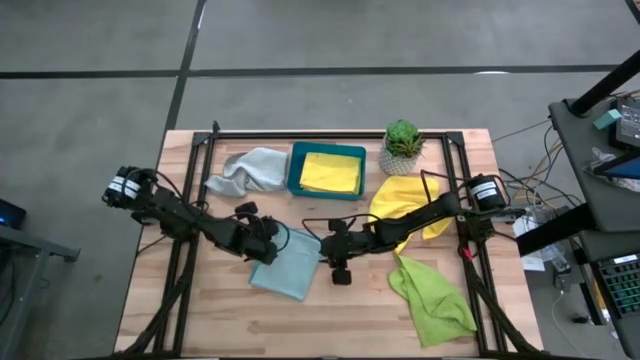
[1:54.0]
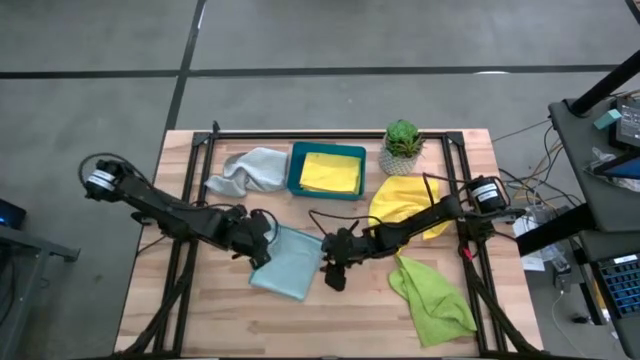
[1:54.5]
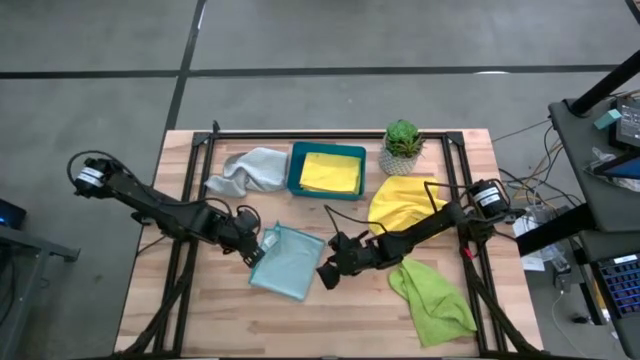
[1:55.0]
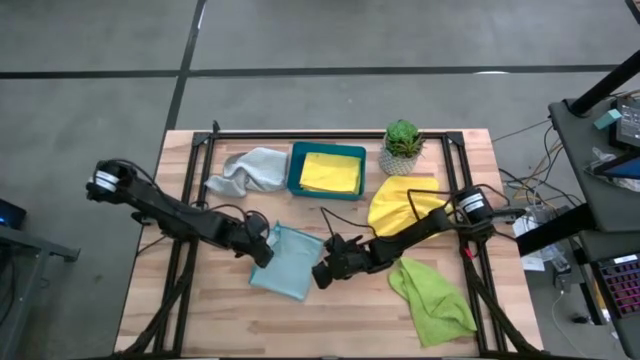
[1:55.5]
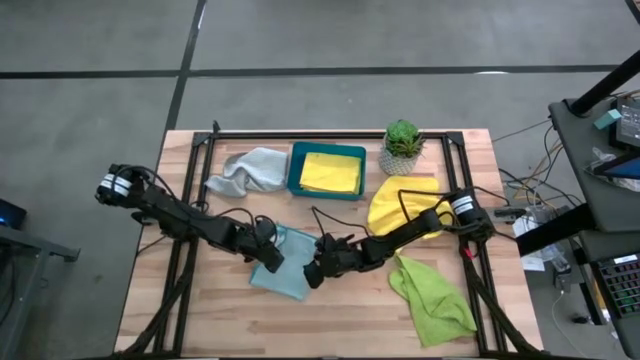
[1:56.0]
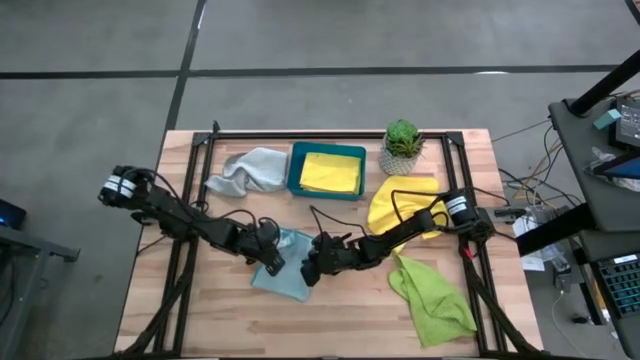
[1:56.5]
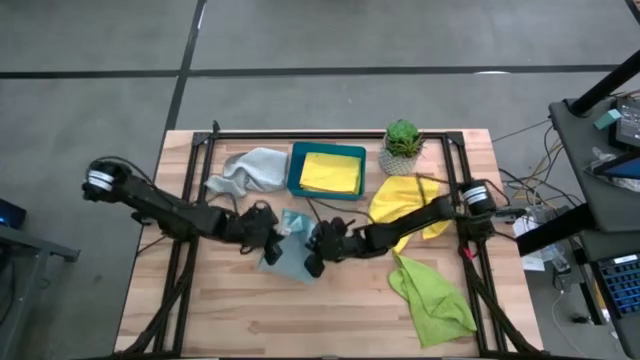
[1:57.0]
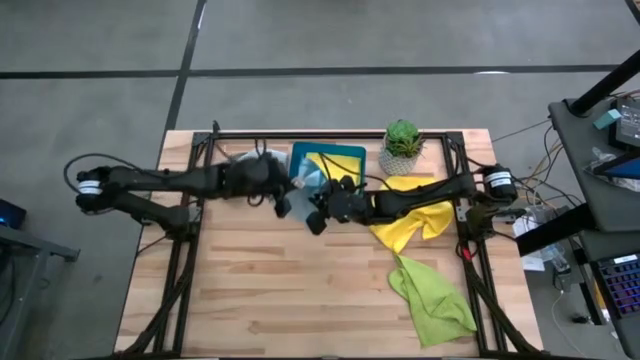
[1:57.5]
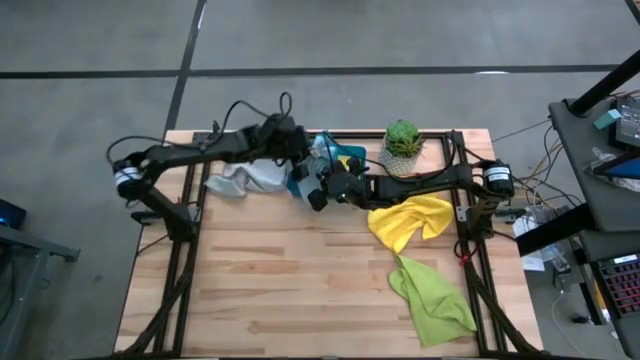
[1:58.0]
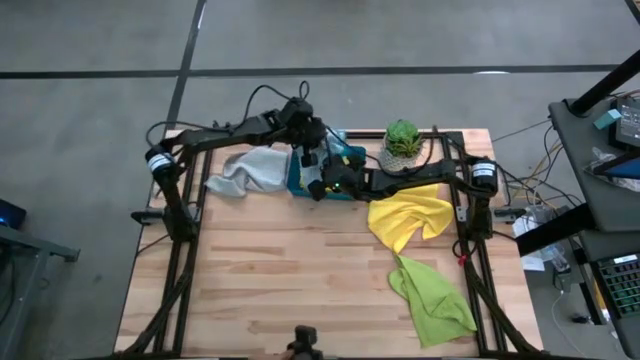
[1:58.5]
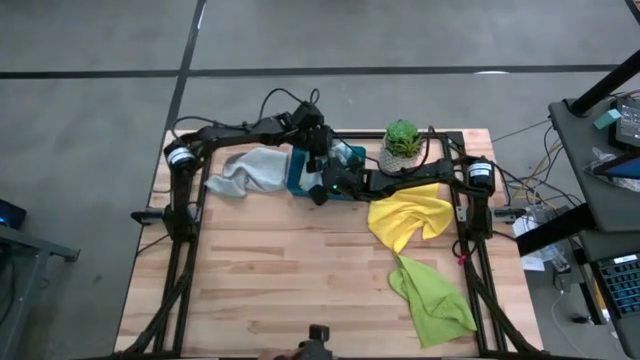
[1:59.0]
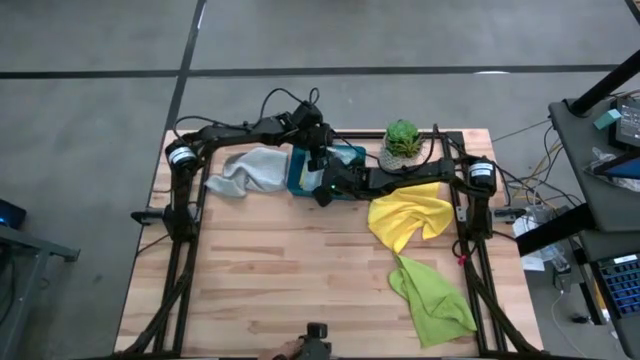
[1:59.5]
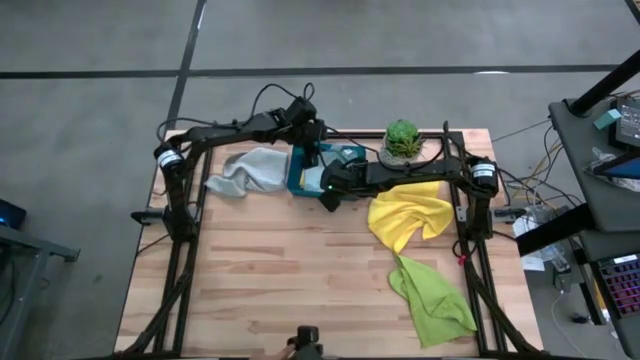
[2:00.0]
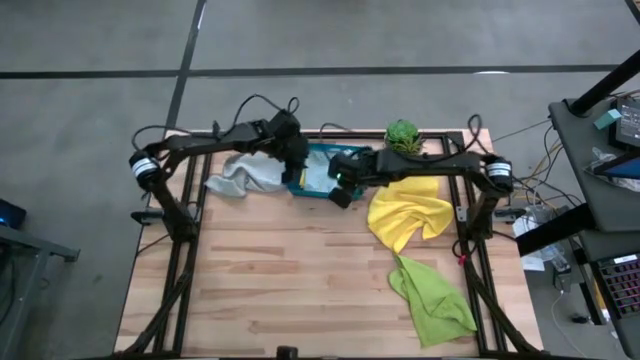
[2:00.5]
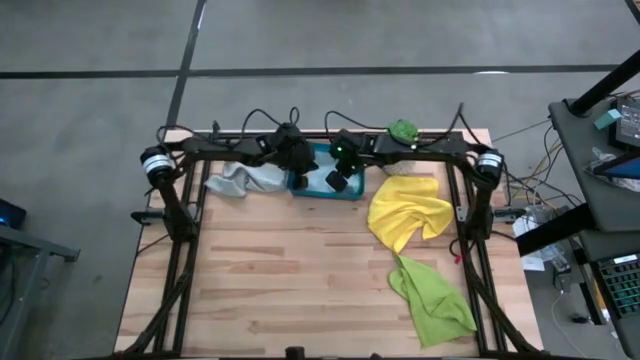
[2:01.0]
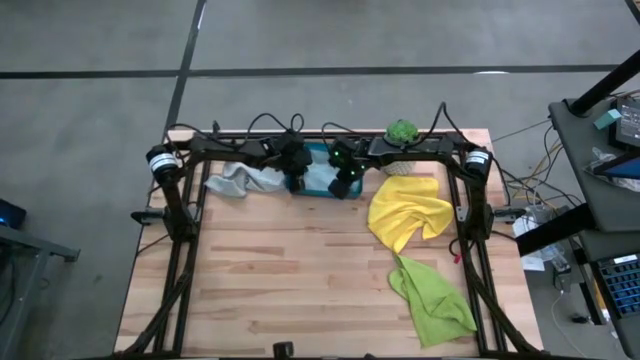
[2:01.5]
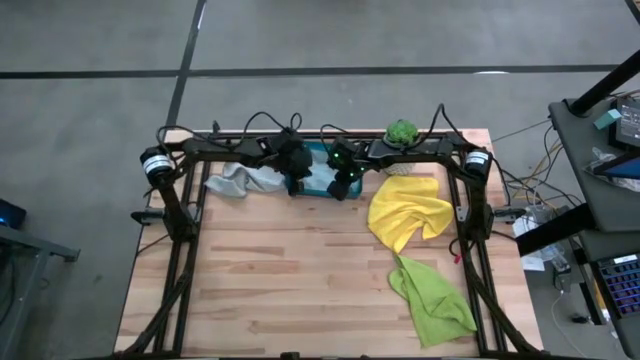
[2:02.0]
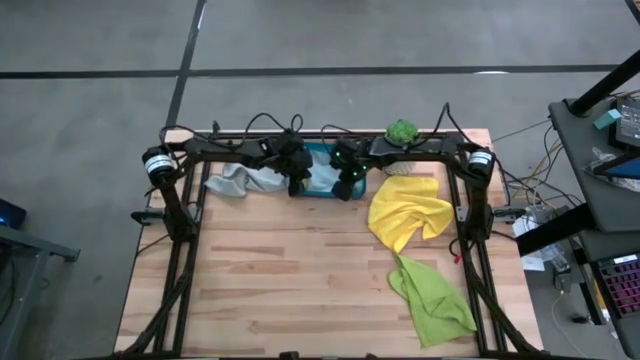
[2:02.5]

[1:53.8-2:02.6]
Task: Fold microfiber towels
Put the folded light blue microfiber cloth into the bin

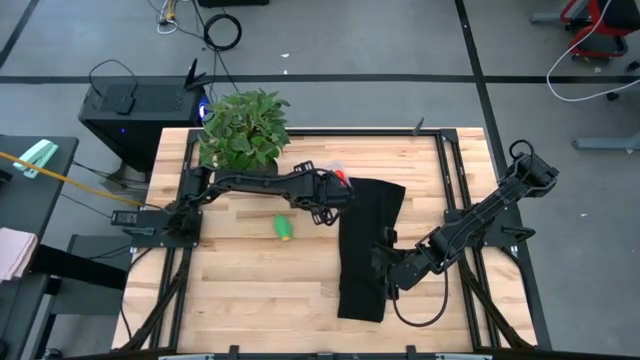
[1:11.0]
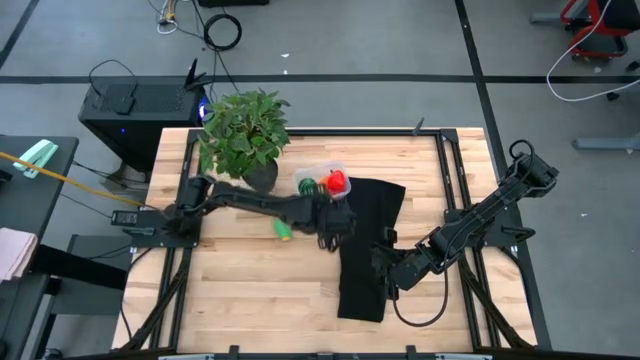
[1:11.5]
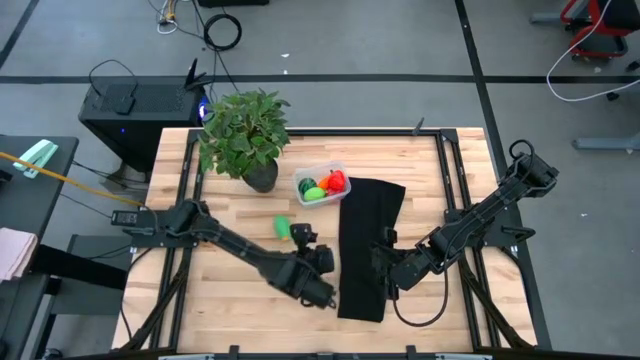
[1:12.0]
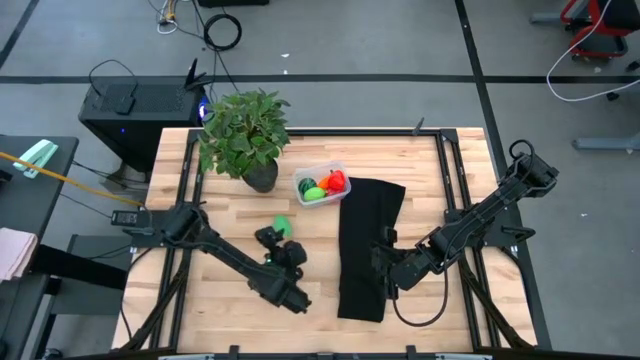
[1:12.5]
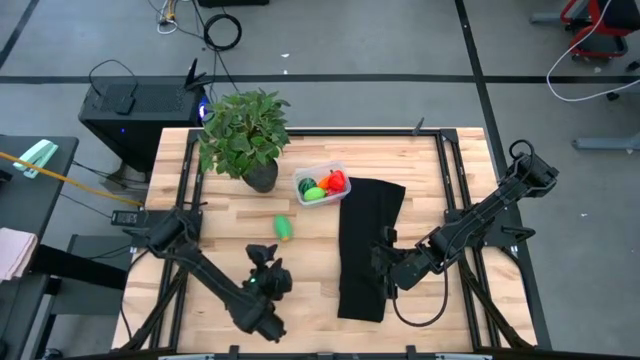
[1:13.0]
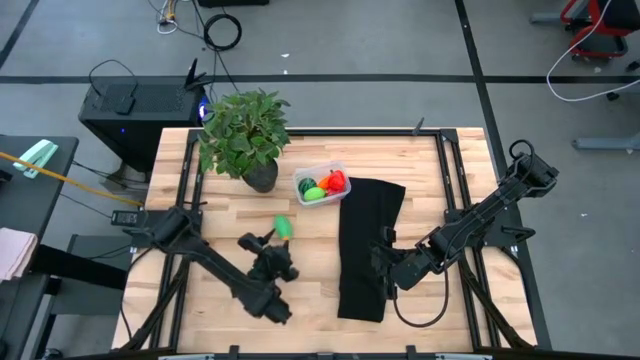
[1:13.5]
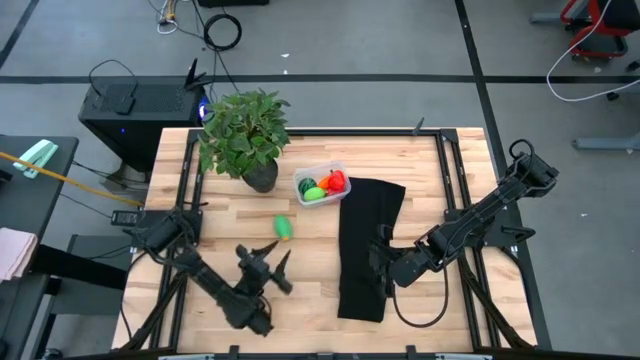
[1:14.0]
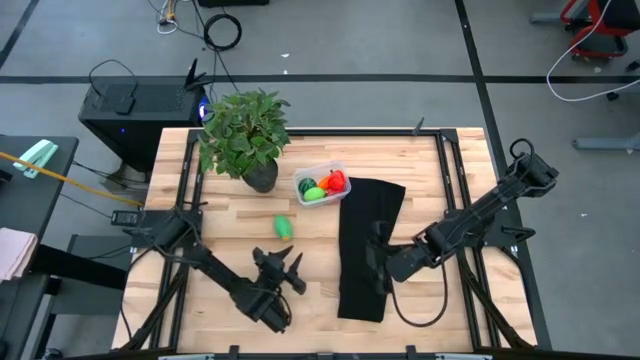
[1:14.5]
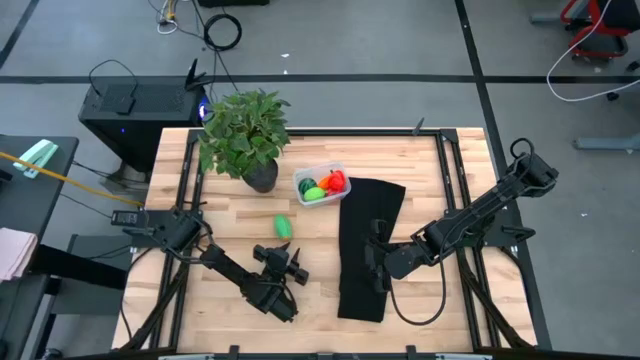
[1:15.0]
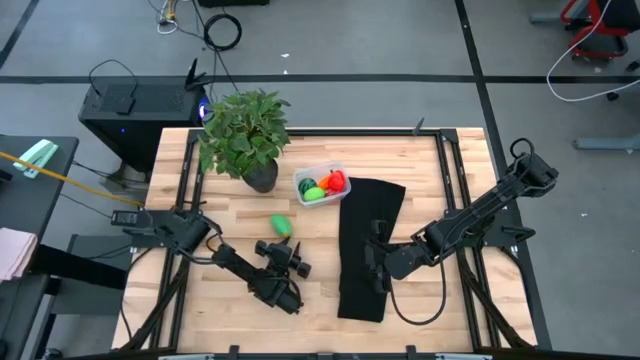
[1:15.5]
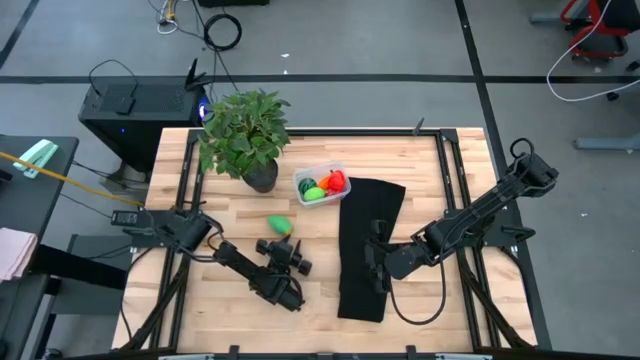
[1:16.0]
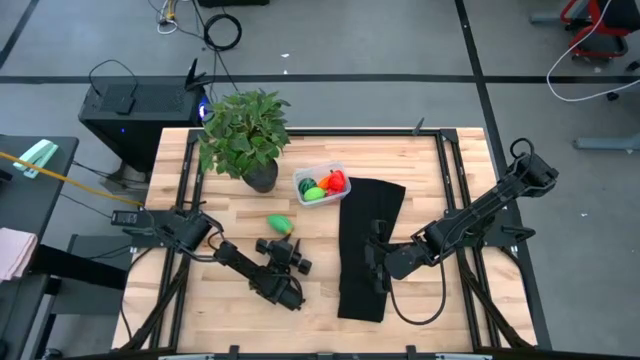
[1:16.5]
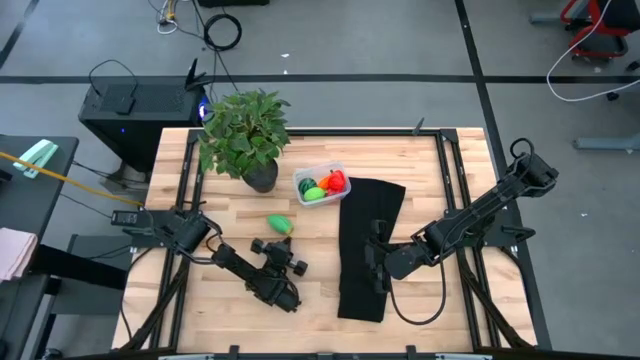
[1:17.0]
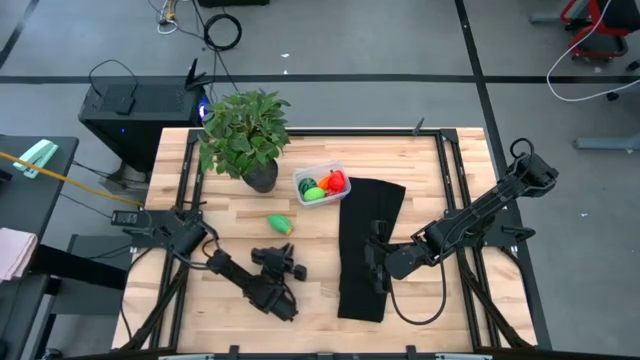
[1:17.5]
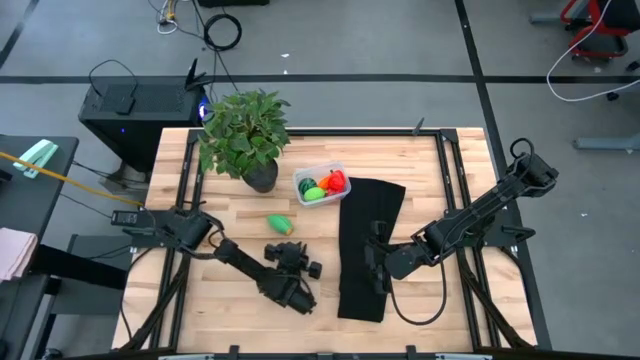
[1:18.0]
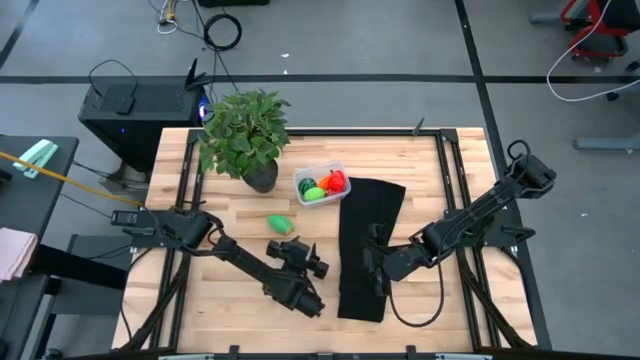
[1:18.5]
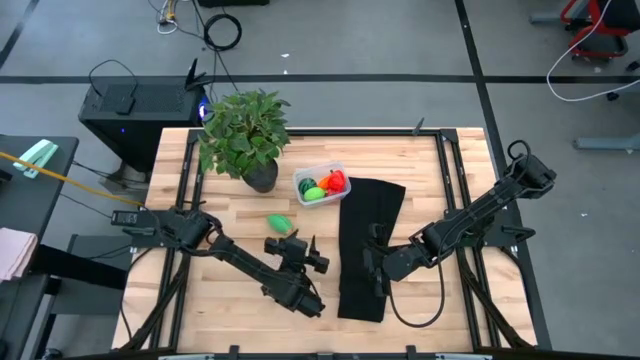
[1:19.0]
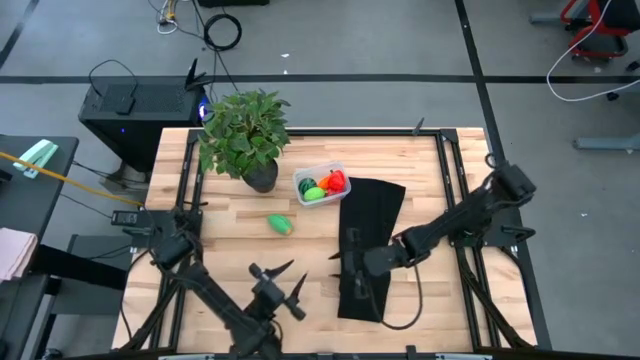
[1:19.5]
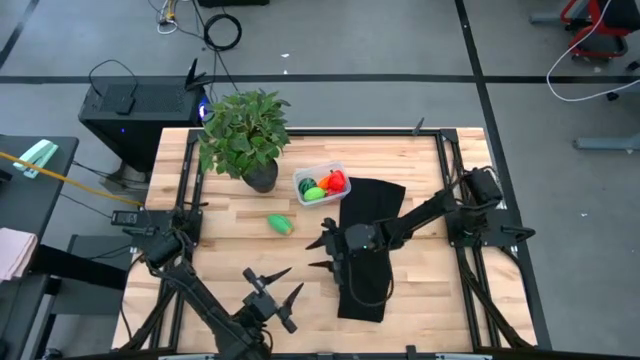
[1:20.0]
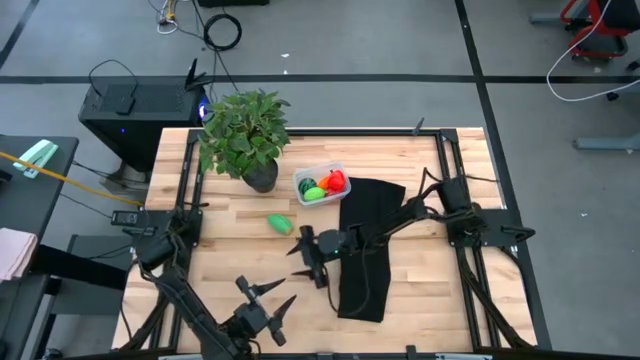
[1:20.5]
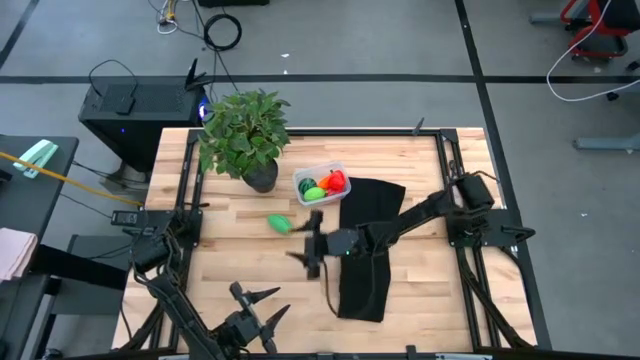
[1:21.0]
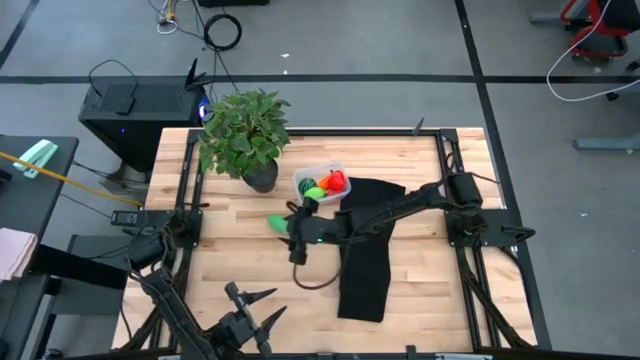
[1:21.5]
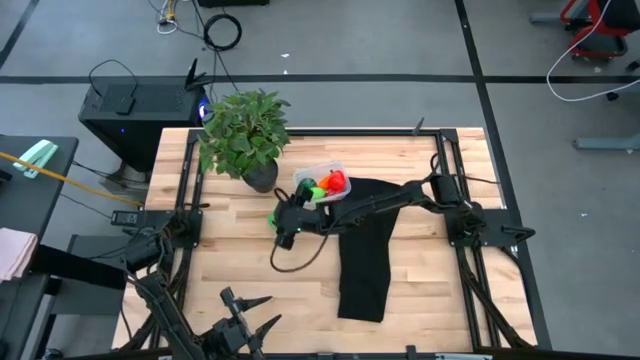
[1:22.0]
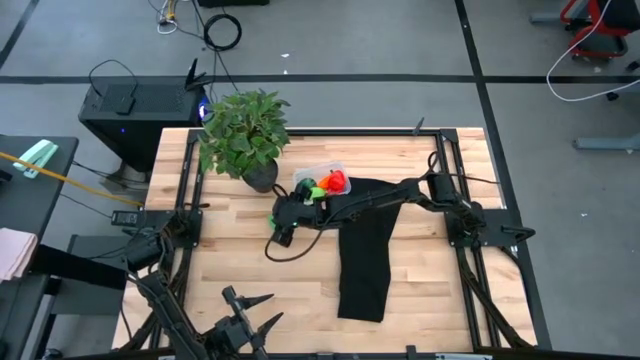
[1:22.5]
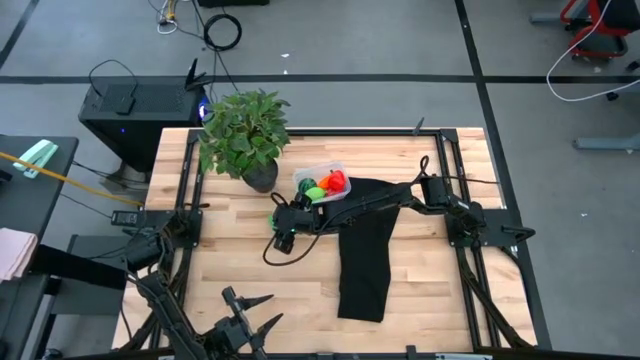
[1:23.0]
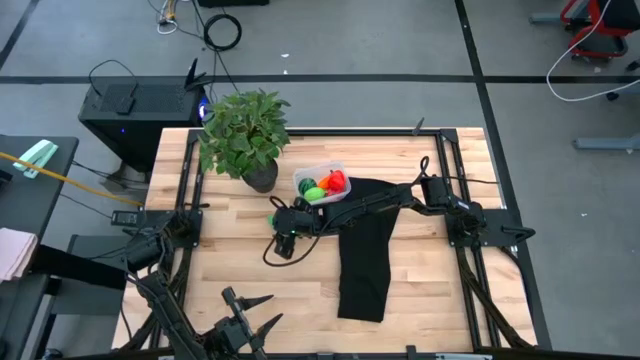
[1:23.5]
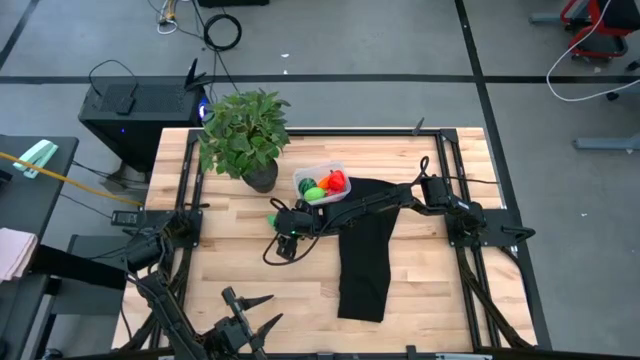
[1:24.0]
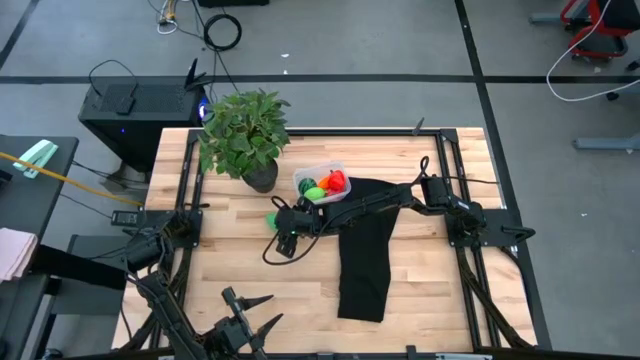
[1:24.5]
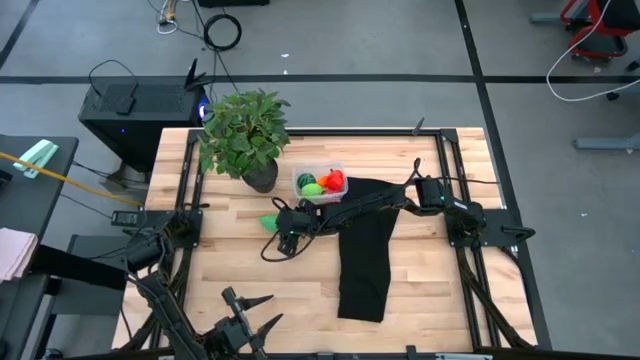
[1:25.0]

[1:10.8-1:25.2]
Task: Pick and placing Produce into tupperware
Put the green corn into the transparent bin
